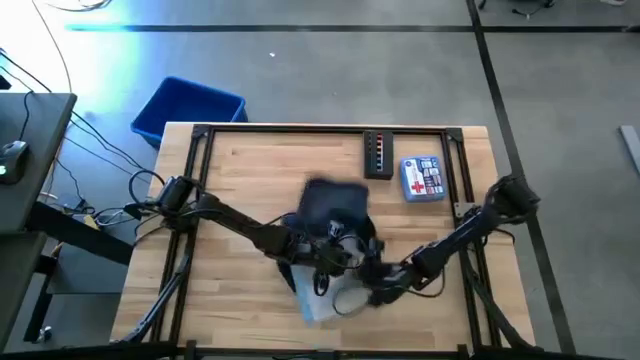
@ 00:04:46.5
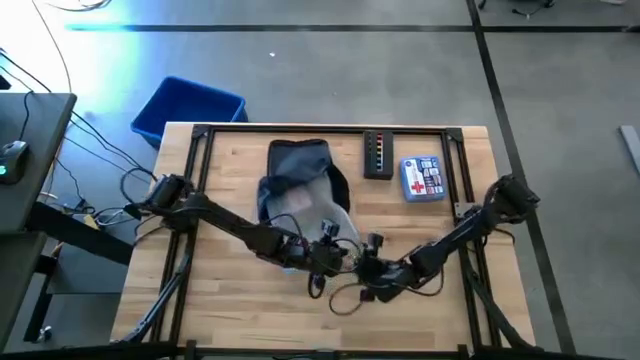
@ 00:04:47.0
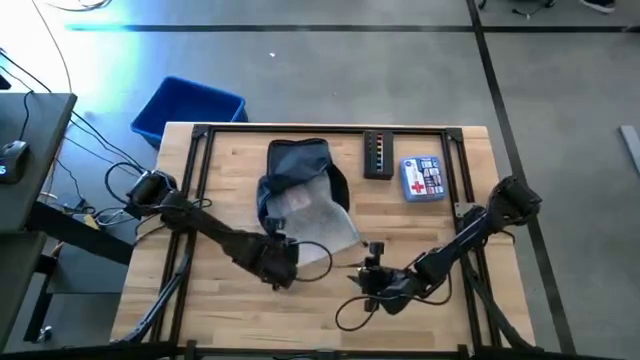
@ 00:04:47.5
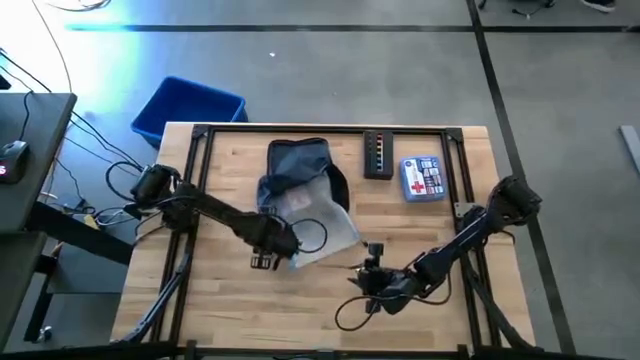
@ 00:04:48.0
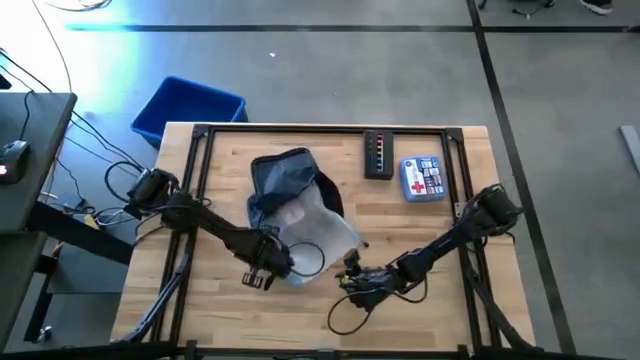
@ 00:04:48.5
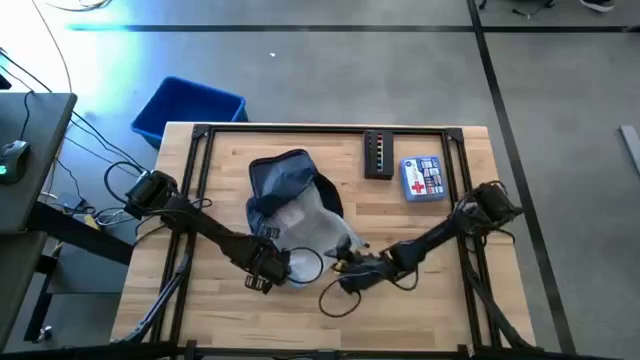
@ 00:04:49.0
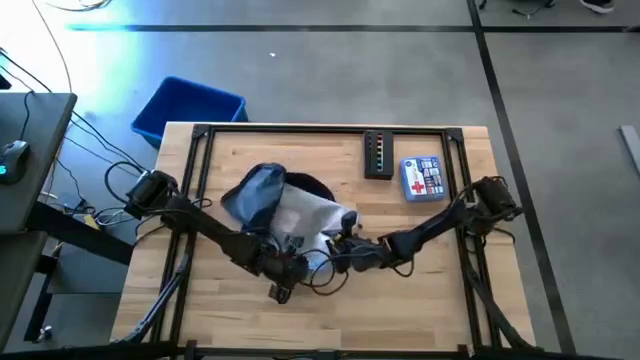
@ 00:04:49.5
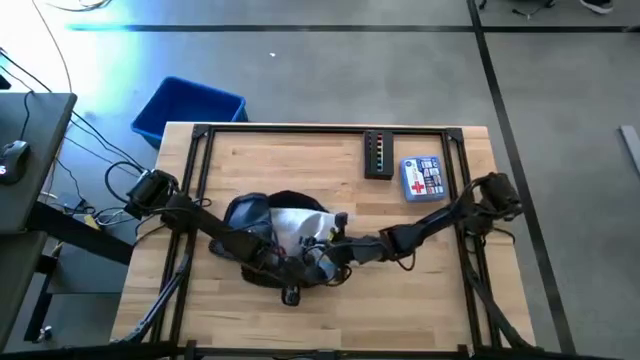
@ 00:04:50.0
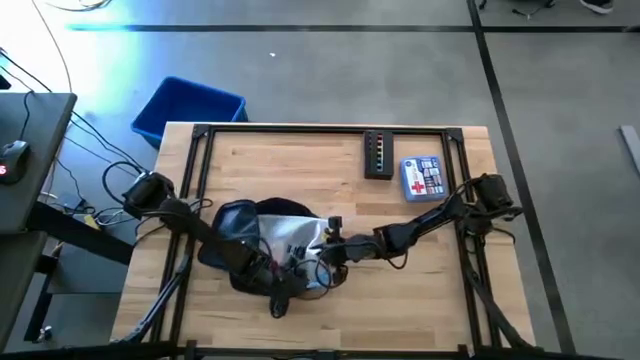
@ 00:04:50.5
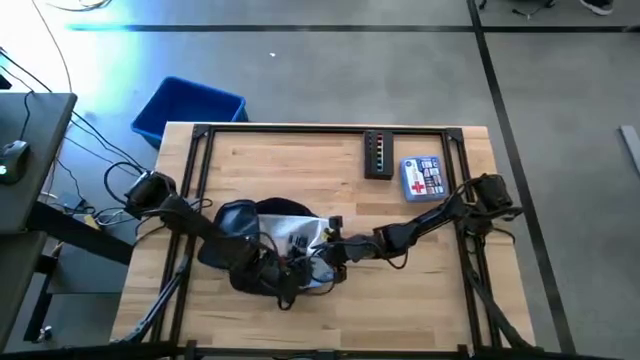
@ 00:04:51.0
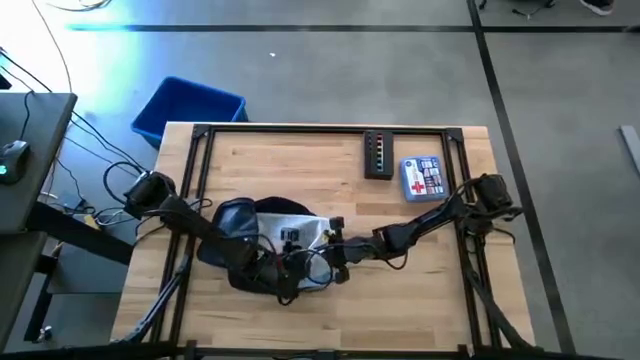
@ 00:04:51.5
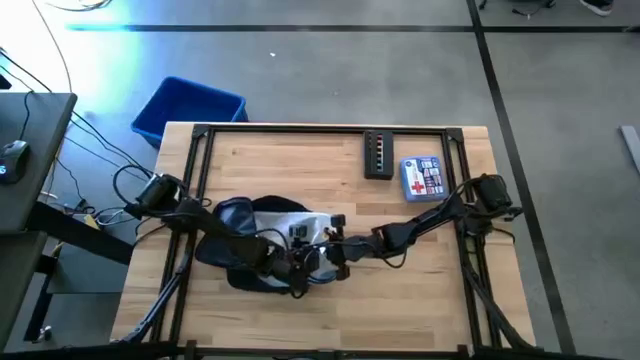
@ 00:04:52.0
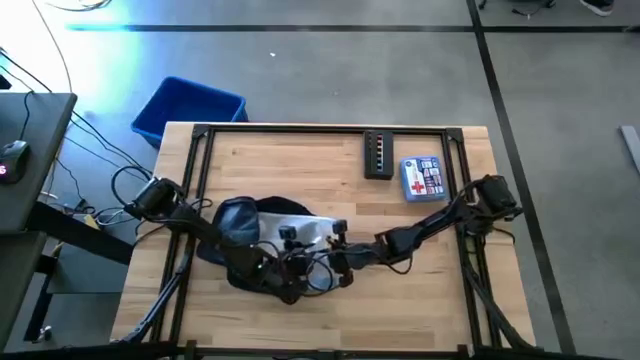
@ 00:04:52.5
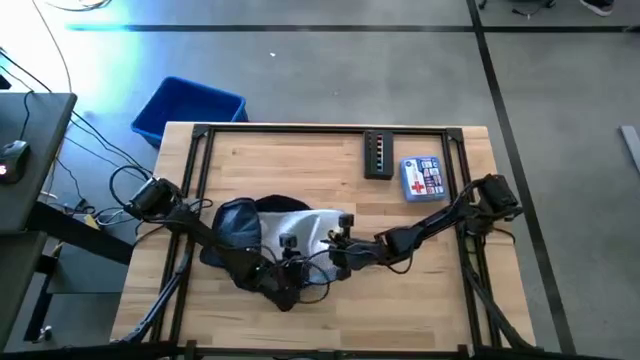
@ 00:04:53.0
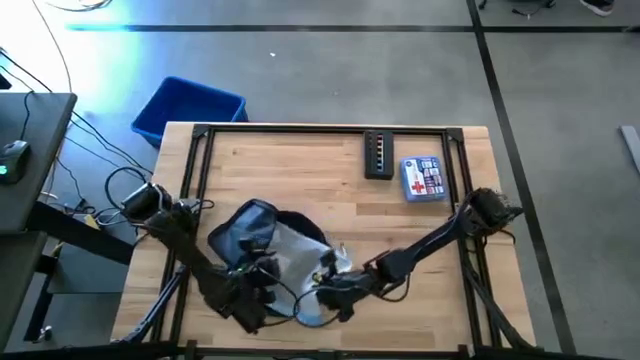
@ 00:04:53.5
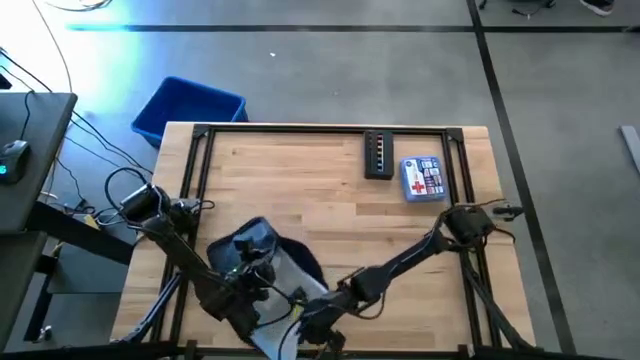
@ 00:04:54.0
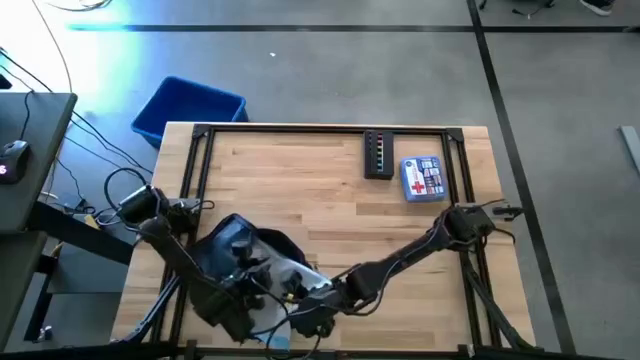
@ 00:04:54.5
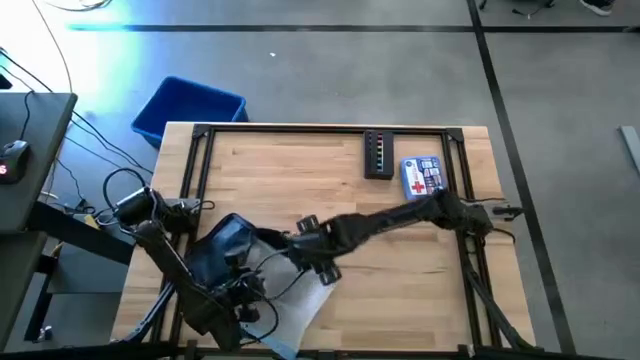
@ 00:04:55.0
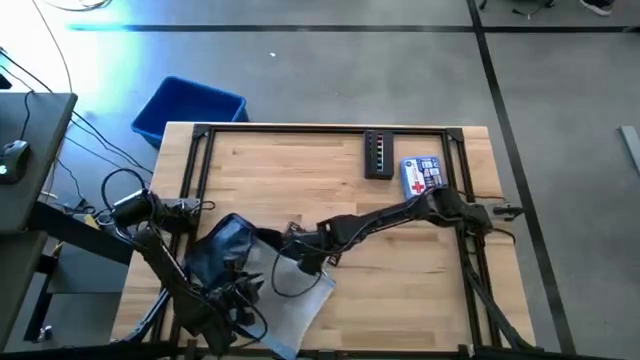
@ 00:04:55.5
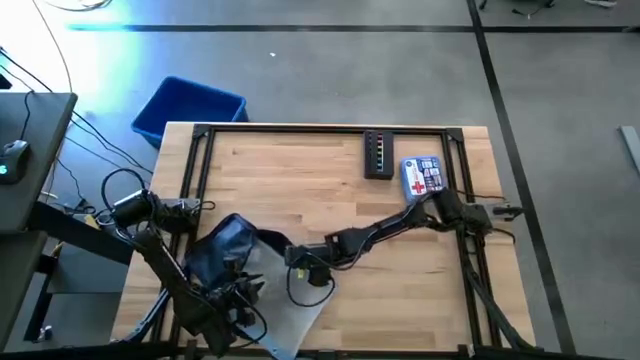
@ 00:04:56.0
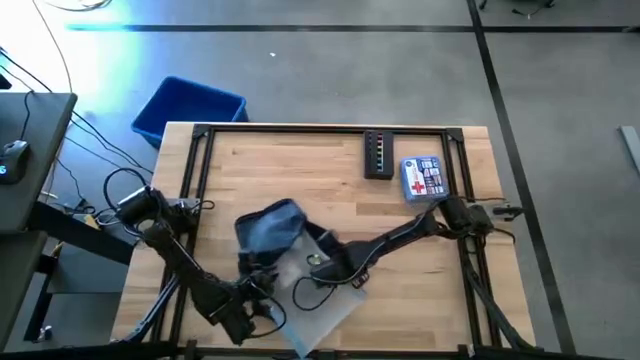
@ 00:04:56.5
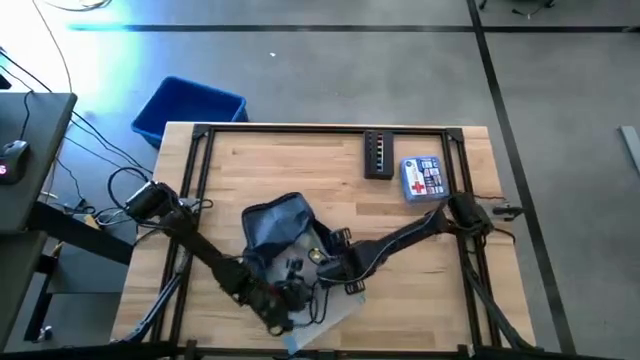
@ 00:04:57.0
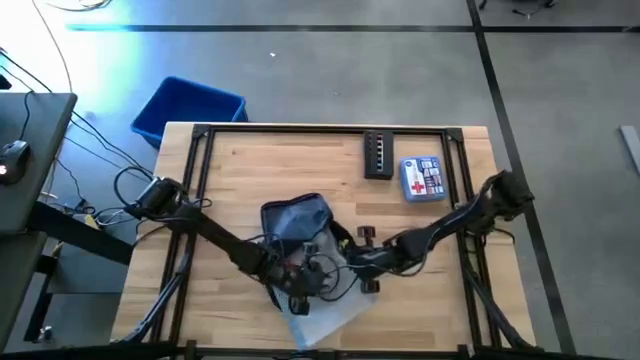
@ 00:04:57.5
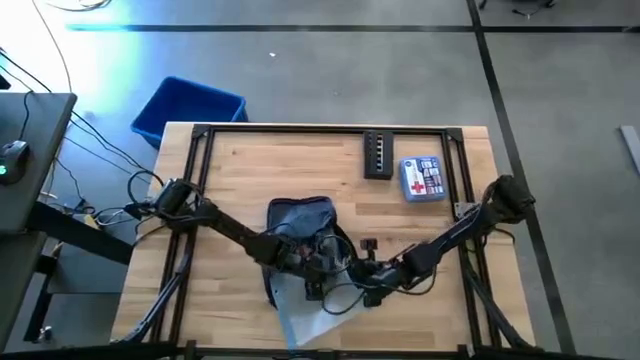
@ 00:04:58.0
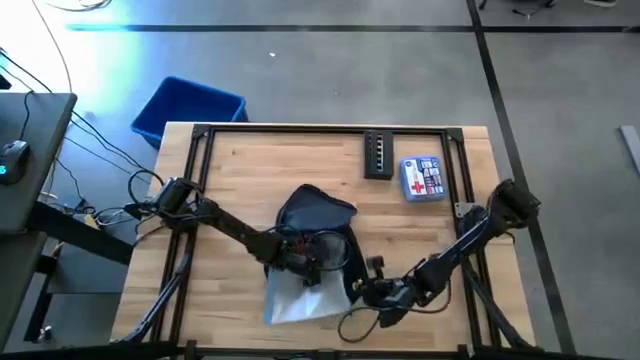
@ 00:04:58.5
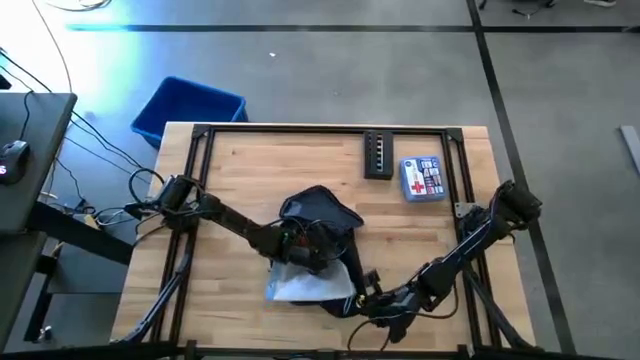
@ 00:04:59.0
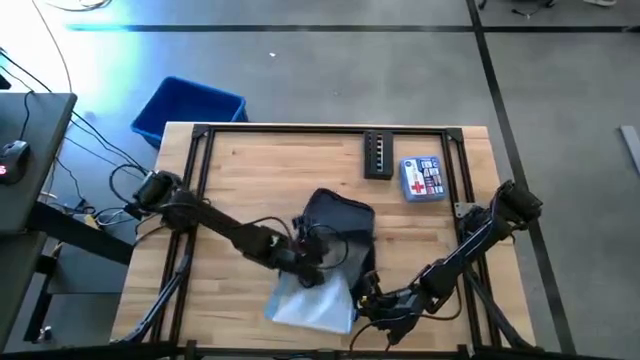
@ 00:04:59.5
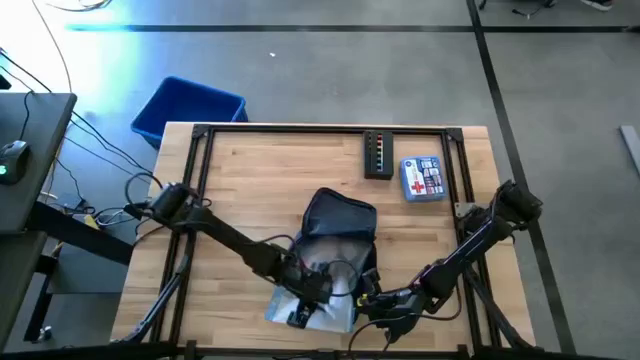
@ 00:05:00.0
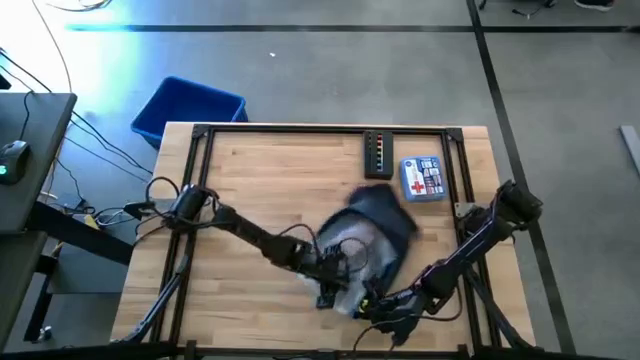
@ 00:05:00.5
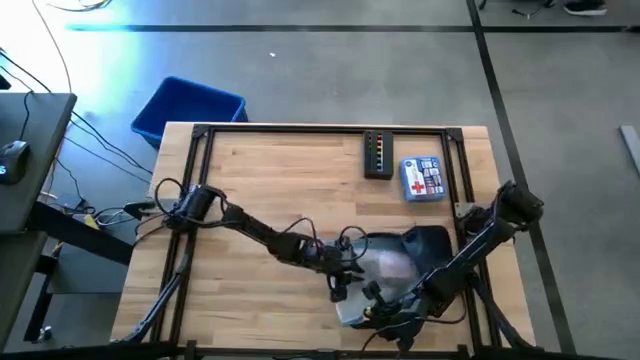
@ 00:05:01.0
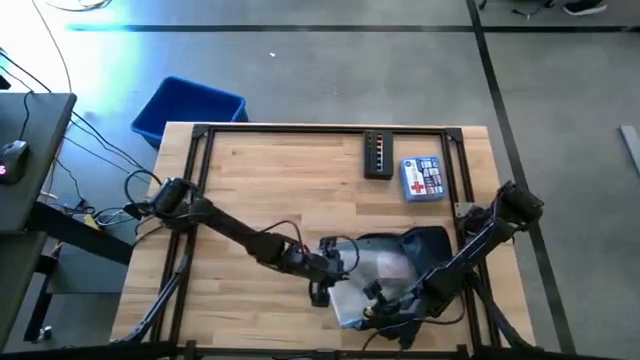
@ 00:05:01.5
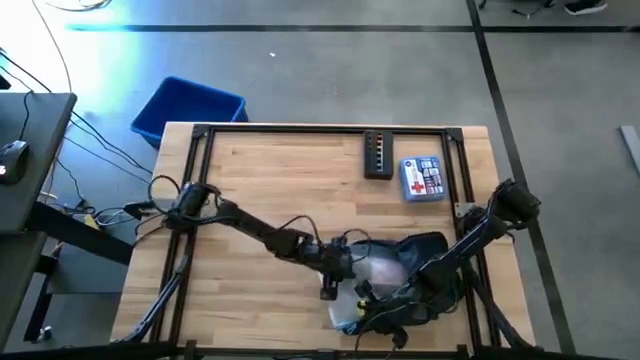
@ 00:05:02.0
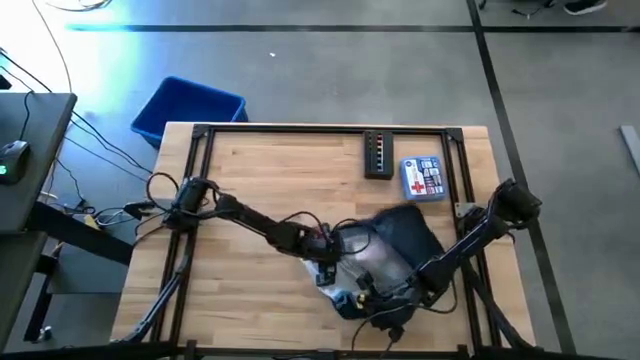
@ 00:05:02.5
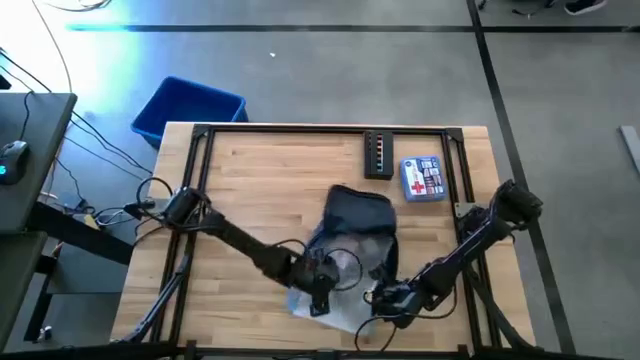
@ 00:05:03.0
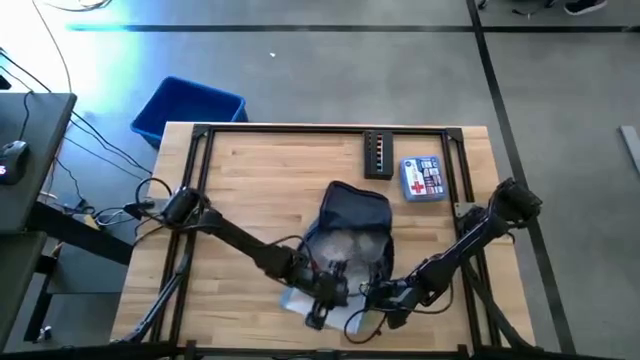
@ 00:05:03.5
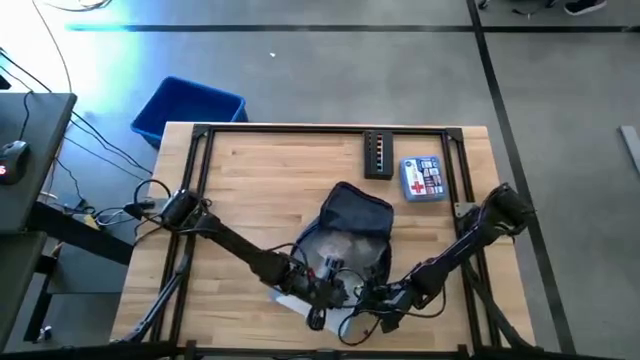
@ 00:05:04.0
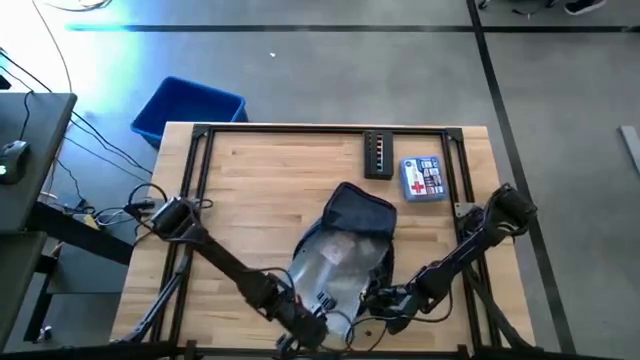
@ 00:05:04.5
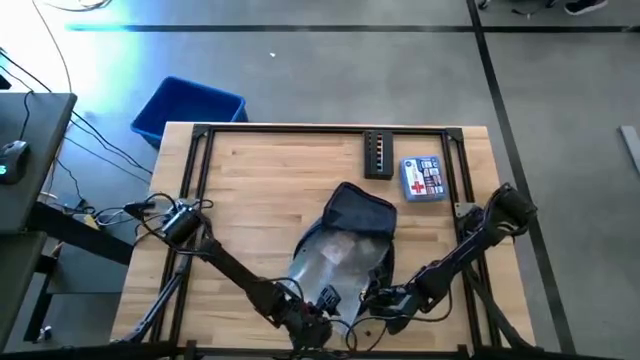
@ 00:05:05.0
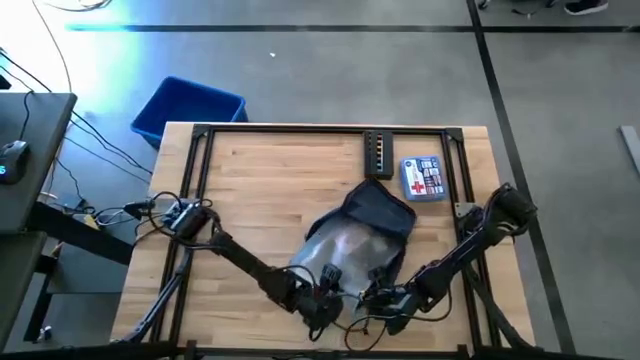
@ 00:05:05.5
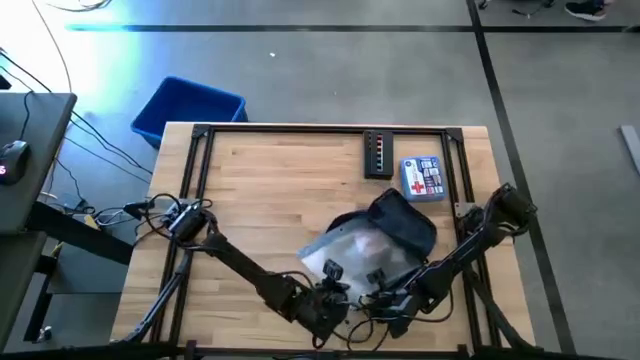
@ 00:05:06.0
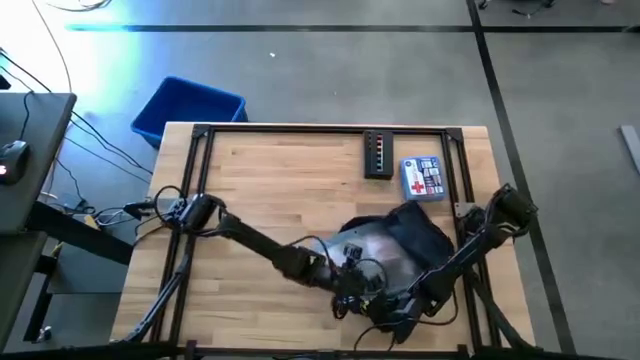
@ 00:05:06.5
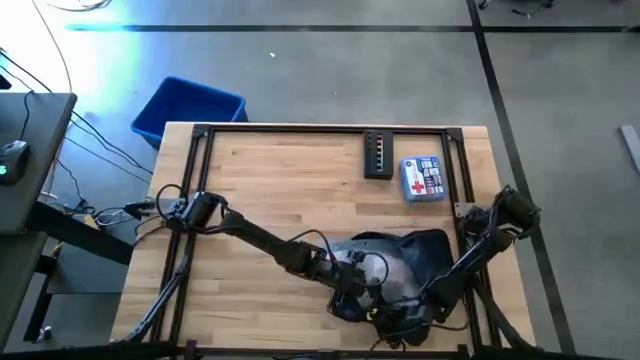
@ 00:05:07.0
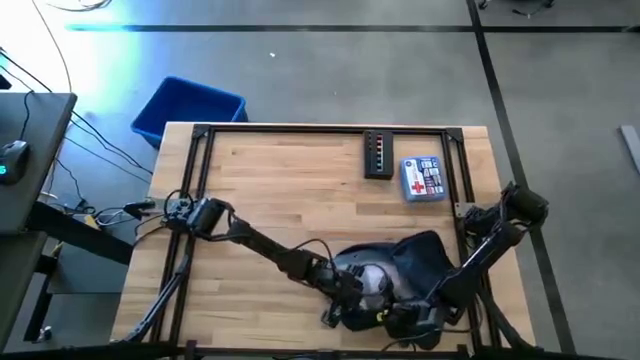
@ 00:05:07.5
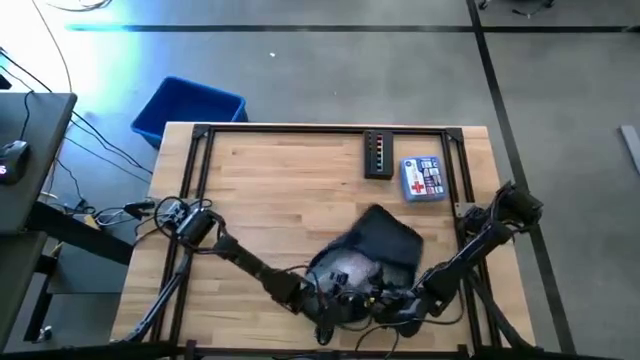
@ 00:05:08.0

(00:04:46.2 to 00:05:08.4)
Task: Unpack backpack
Put the white zip bag into the backpack
